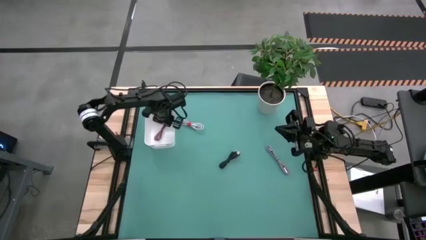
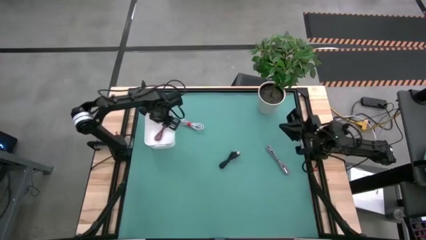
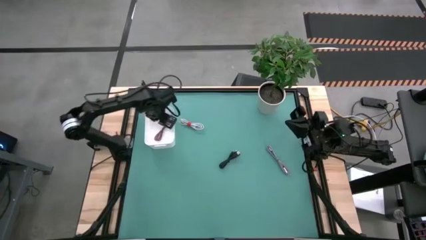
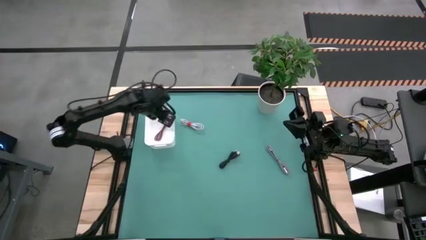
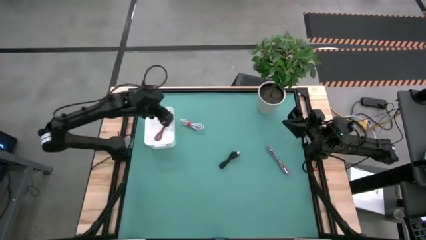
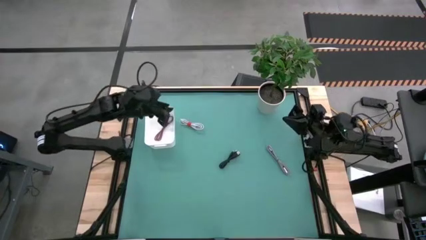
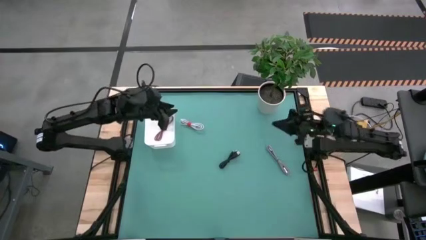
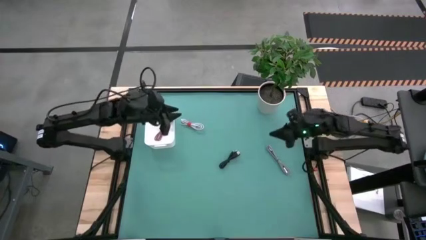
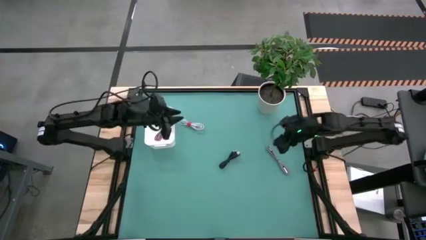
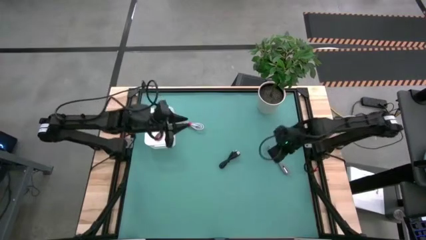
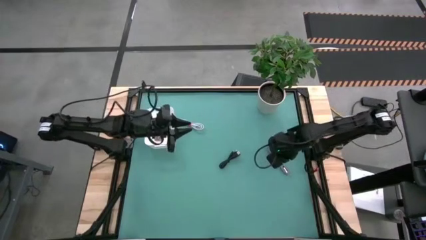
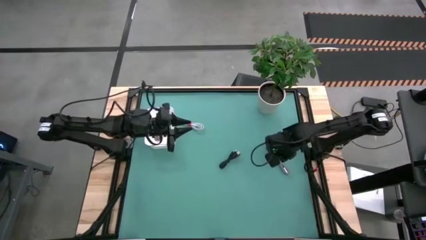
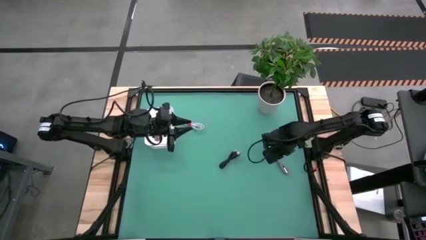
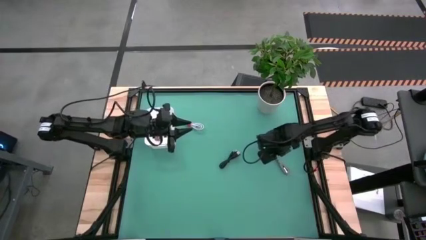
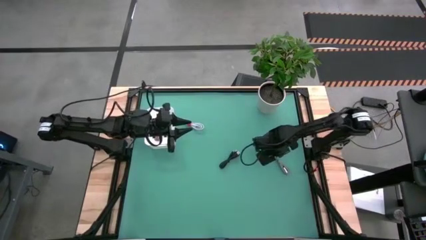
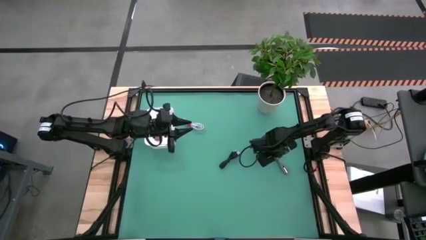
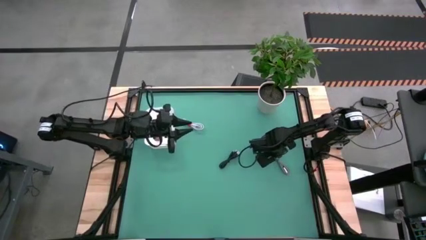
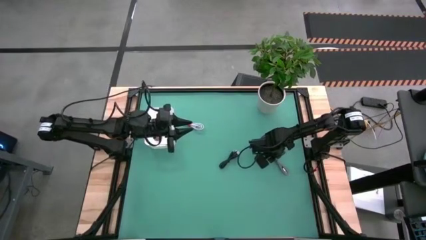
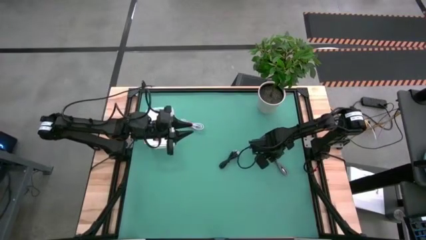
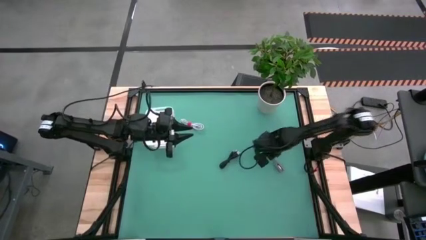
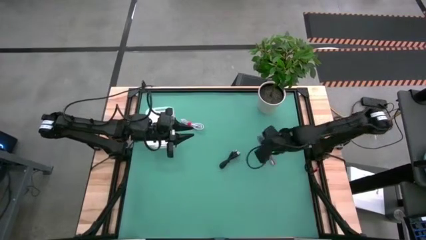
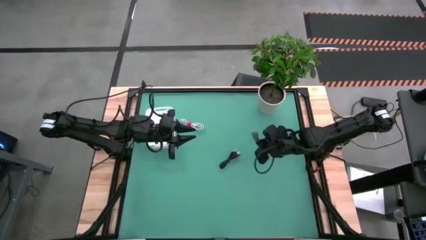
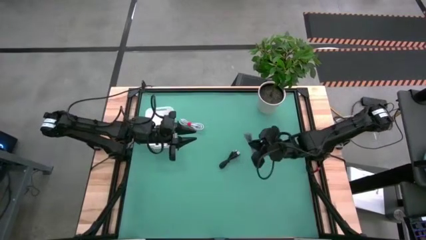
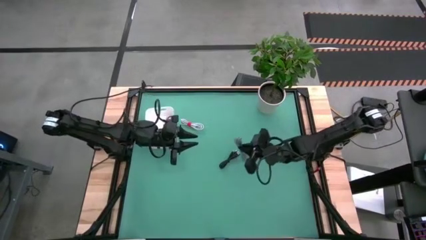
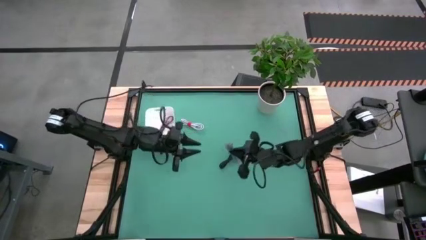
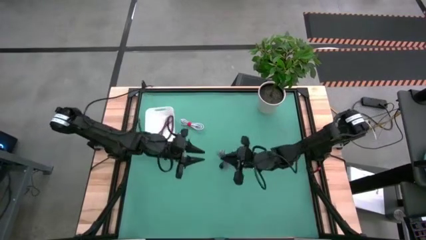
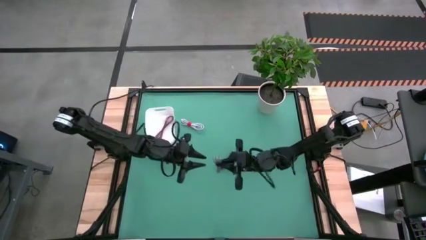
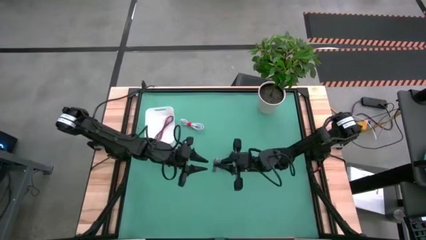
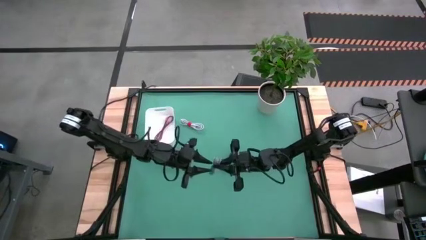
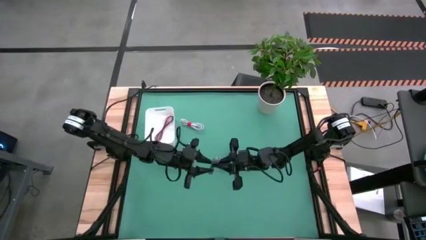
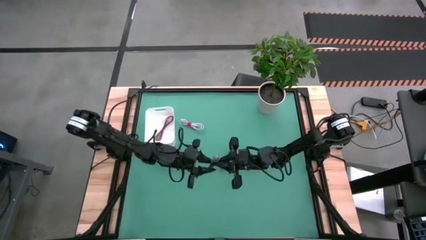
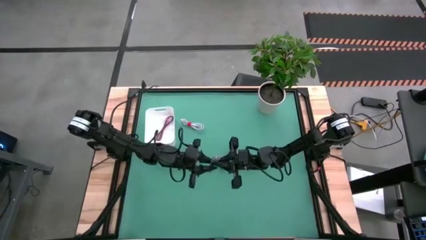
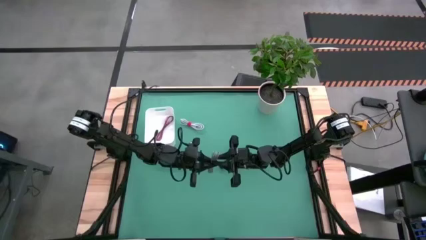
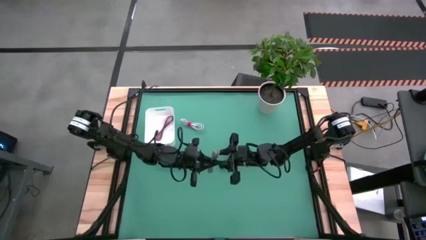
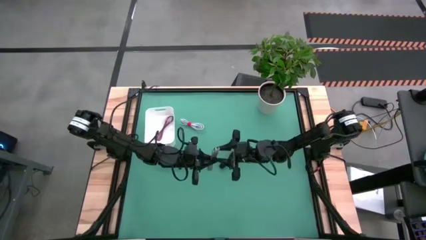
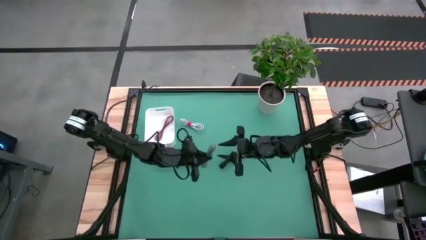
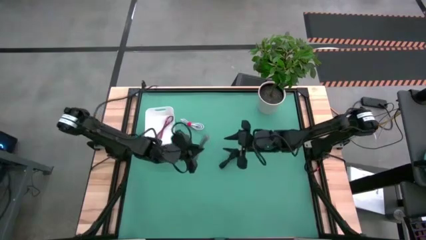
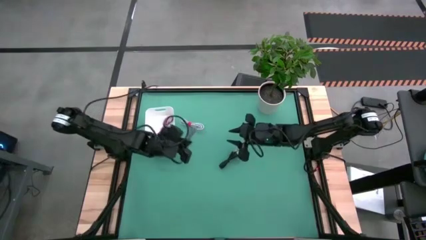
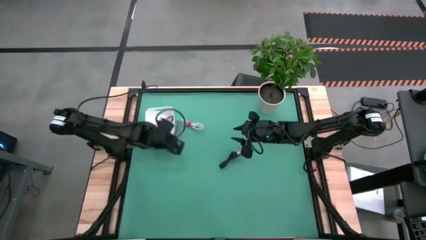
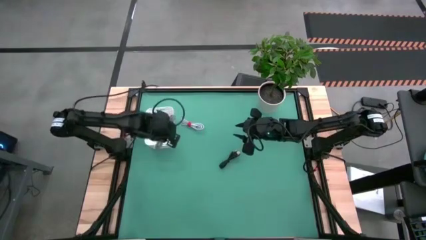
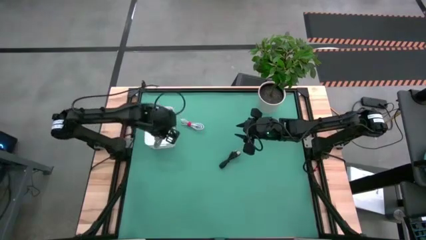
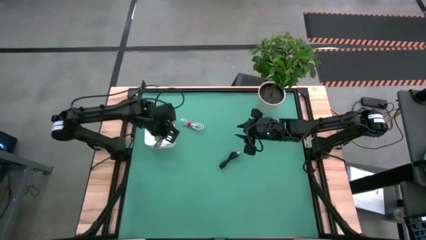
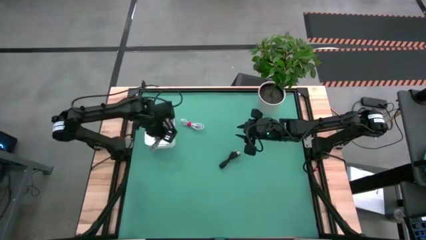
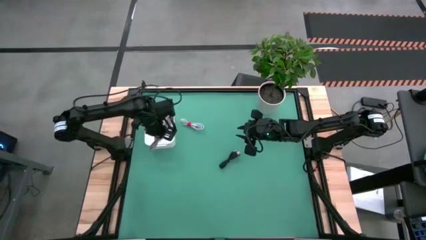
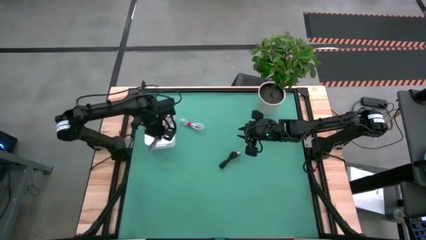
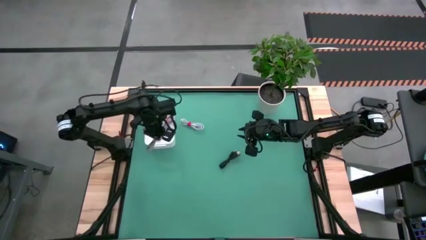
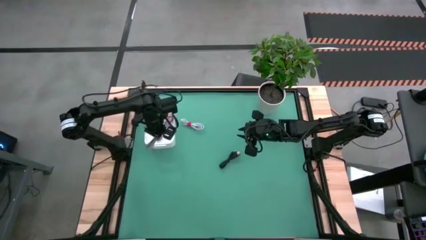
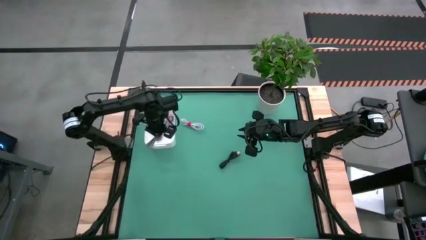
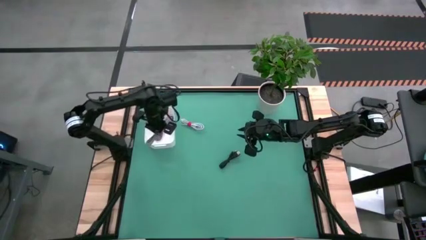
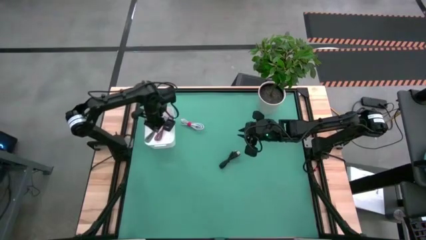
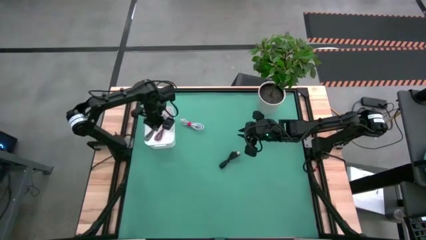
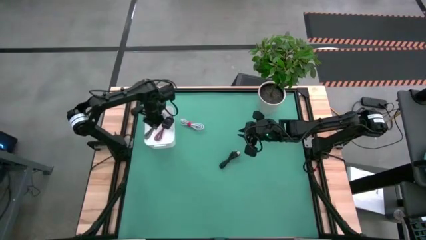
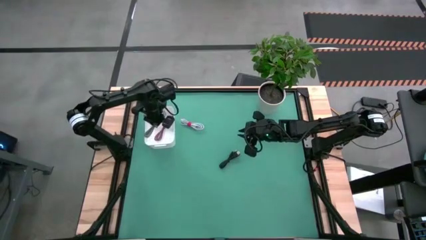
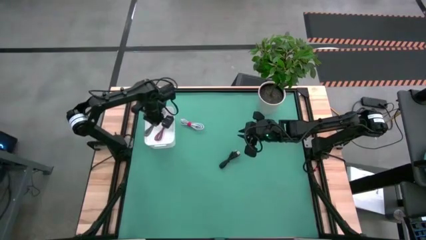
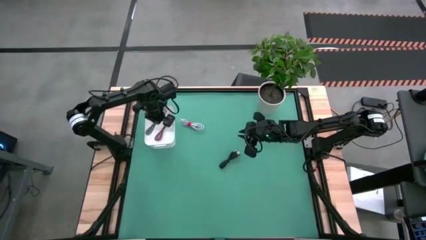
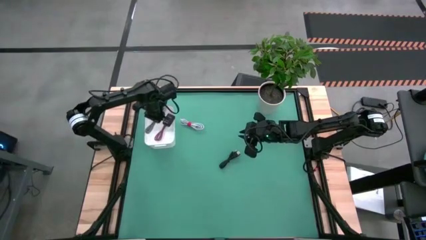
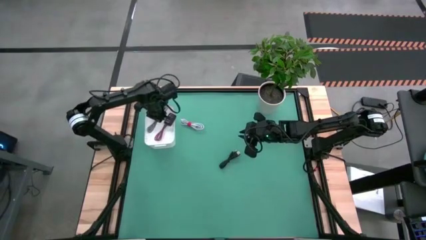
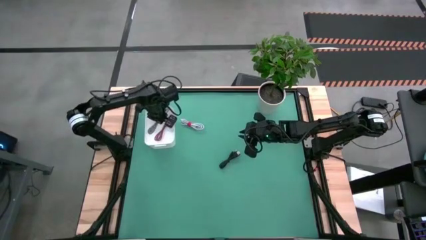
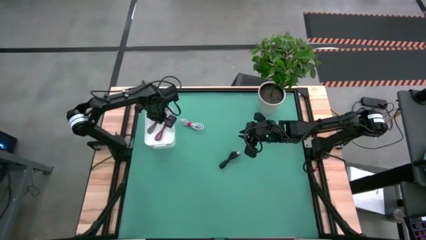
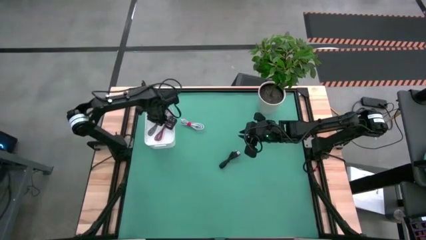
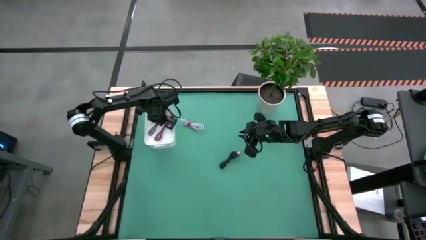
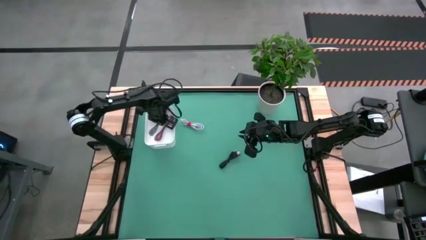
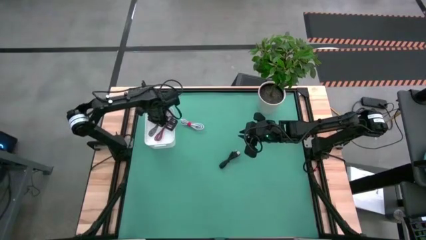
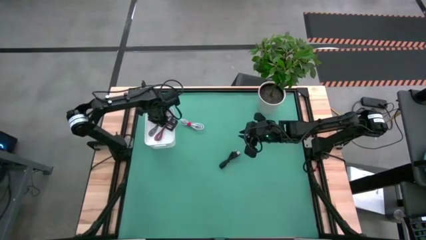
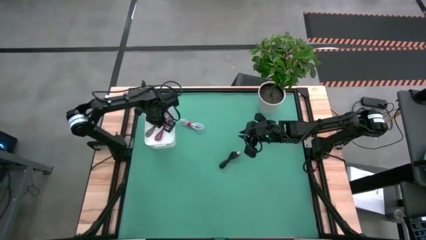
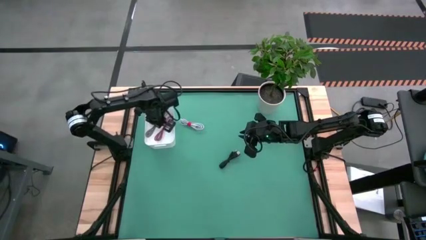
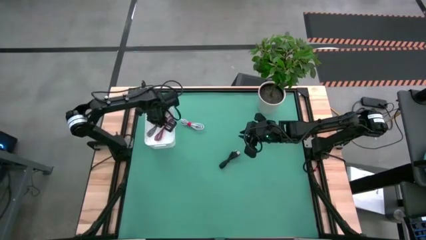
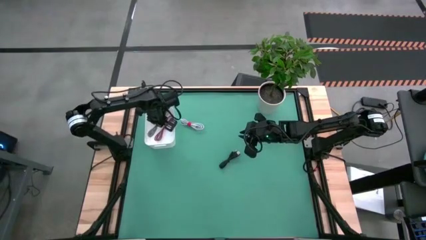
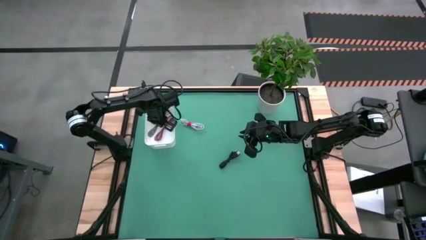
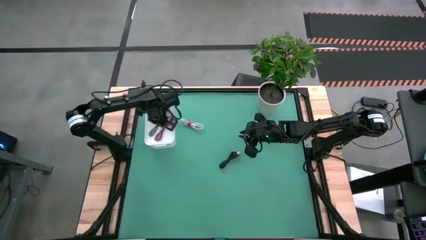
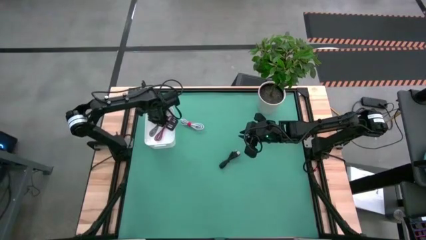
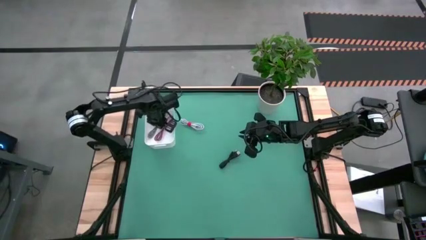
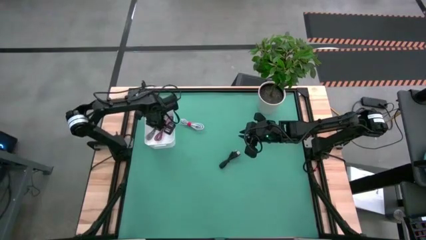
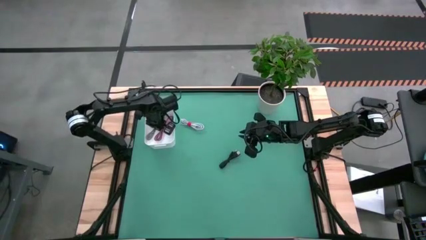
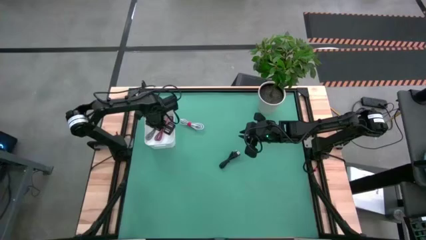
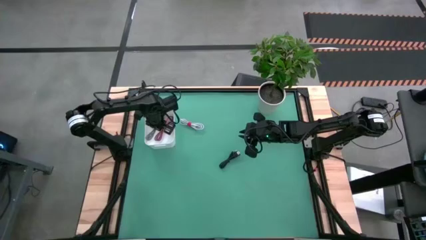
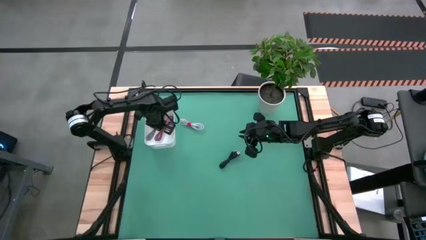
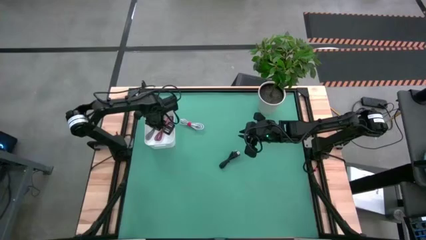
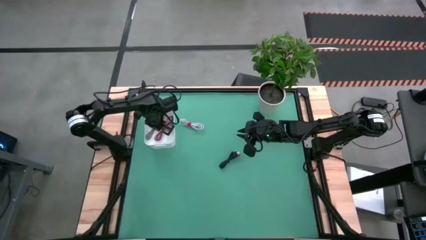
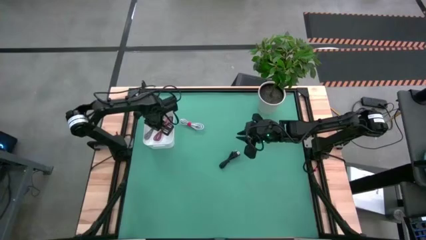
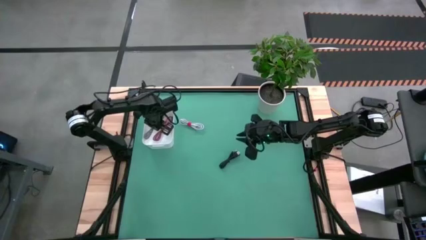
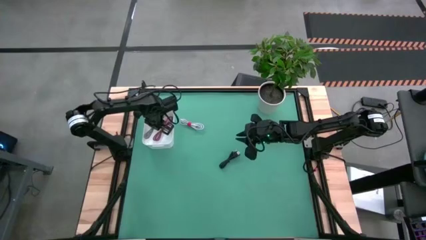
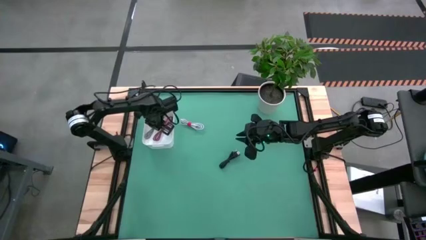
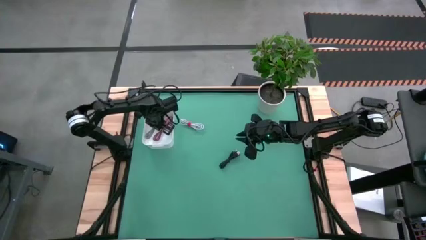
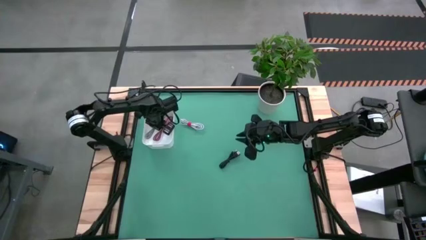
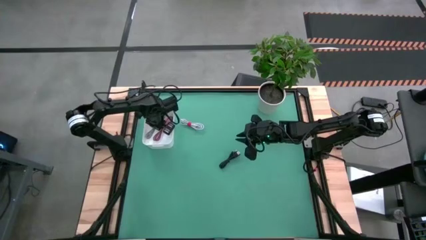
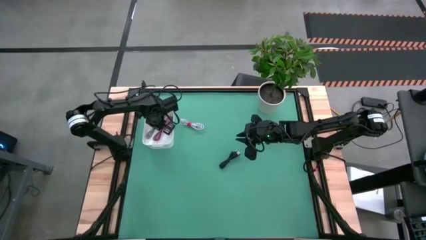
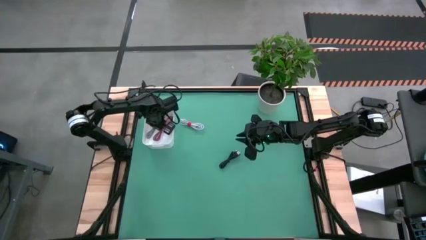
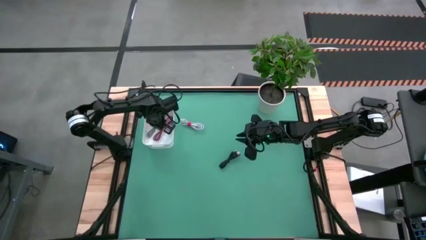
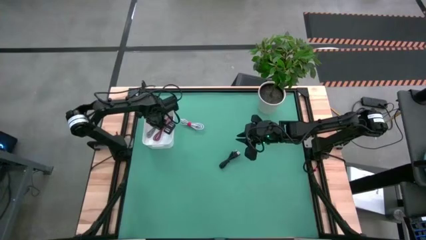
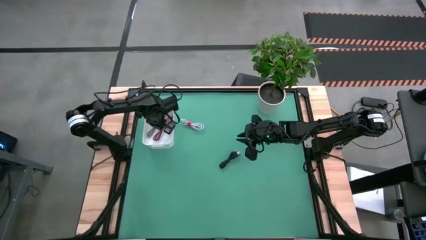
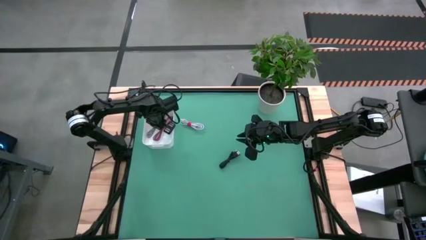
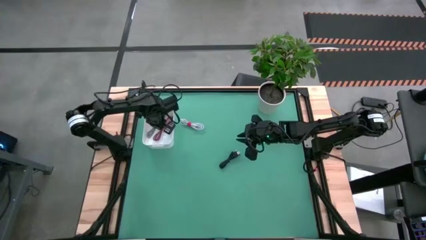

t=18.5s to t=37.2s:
Task: Pick and place USB-C Cables
Put the gray charger cable into the white bin
